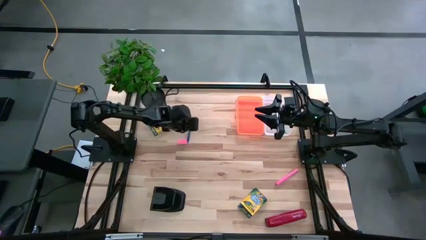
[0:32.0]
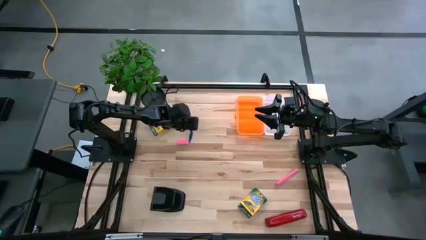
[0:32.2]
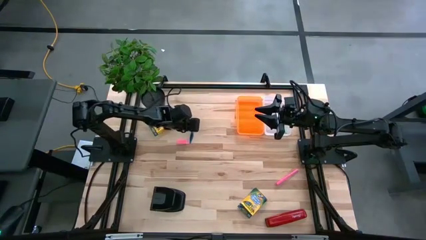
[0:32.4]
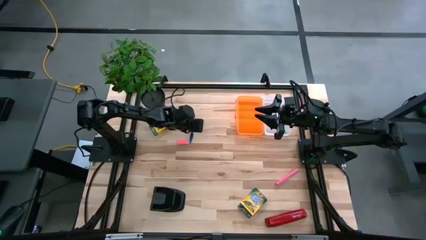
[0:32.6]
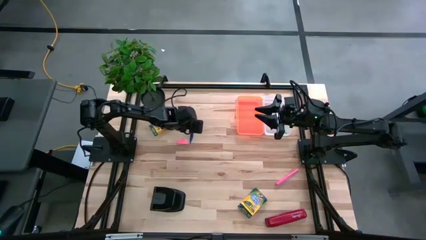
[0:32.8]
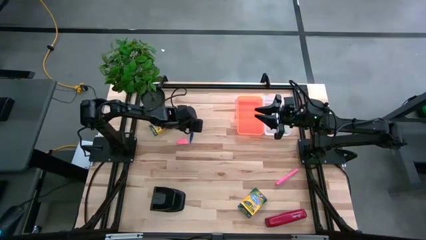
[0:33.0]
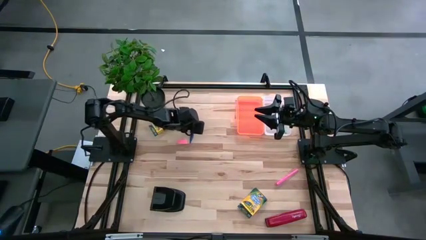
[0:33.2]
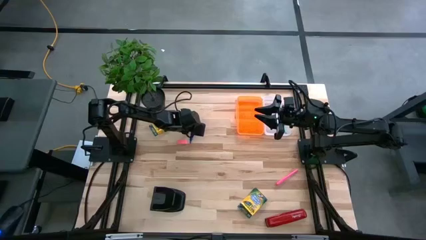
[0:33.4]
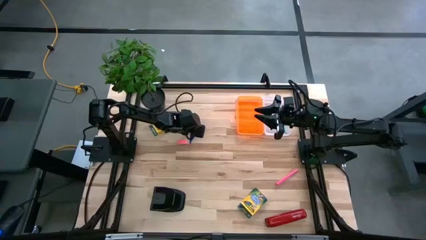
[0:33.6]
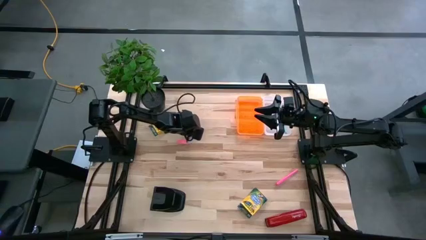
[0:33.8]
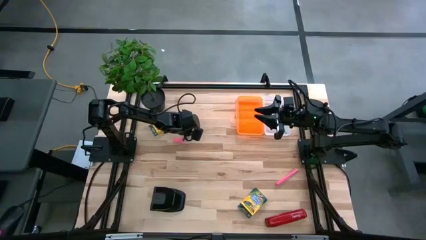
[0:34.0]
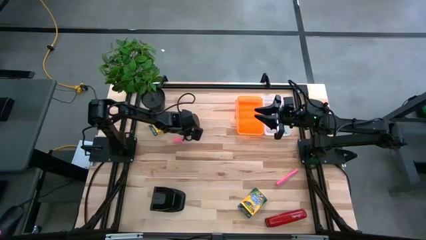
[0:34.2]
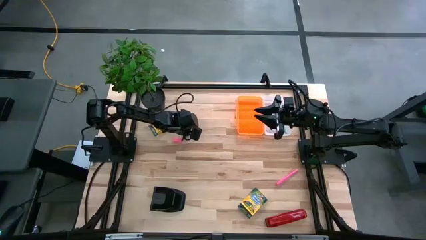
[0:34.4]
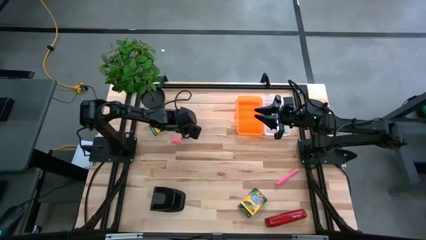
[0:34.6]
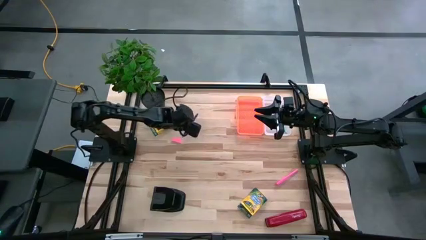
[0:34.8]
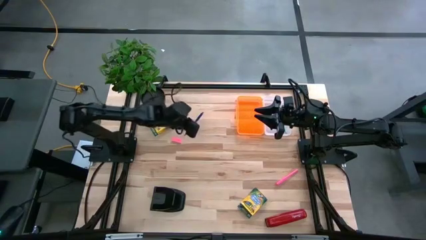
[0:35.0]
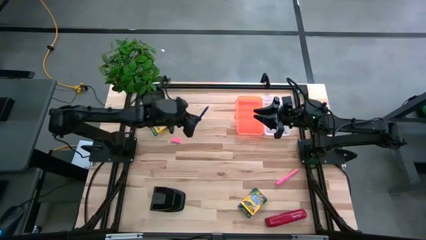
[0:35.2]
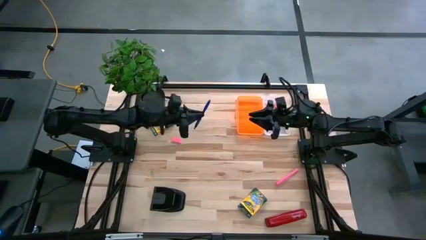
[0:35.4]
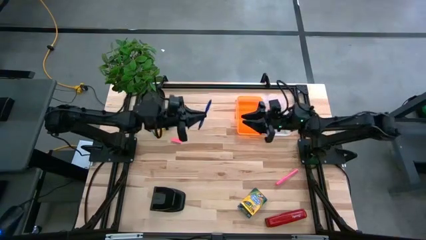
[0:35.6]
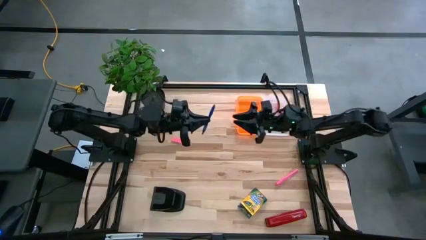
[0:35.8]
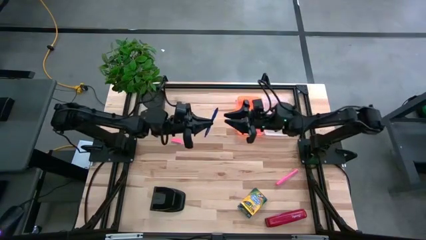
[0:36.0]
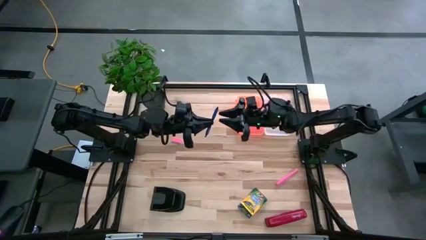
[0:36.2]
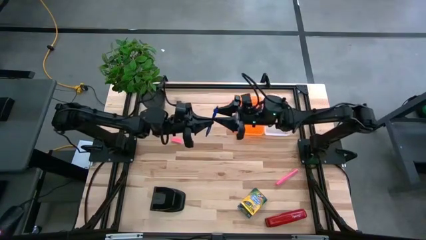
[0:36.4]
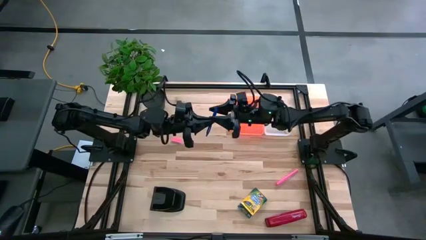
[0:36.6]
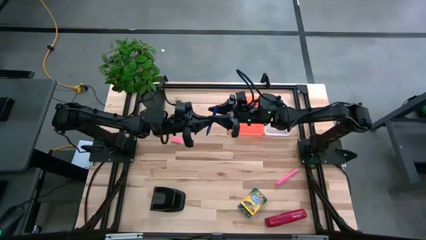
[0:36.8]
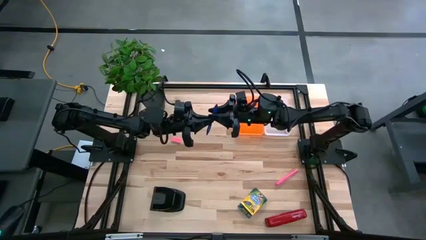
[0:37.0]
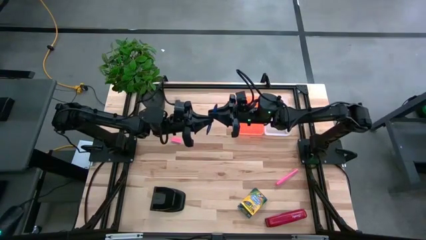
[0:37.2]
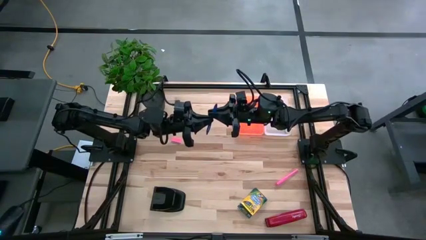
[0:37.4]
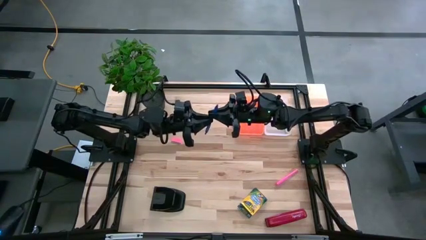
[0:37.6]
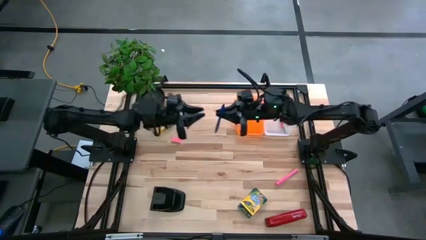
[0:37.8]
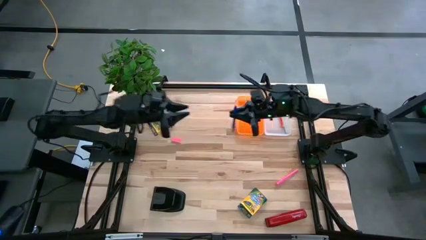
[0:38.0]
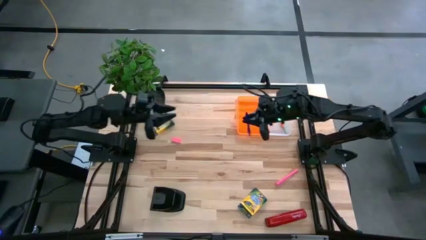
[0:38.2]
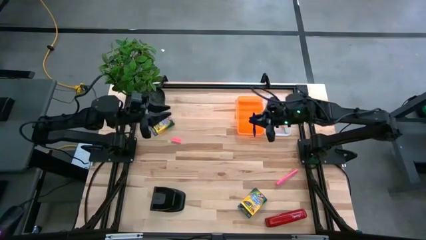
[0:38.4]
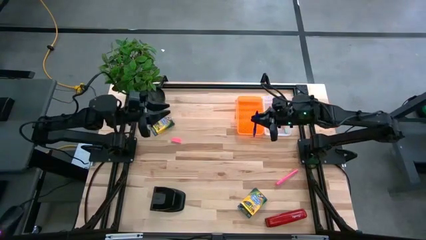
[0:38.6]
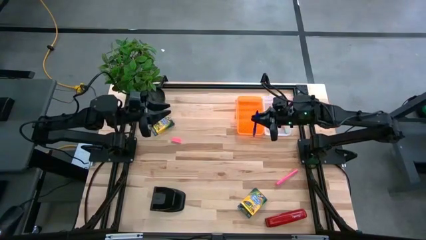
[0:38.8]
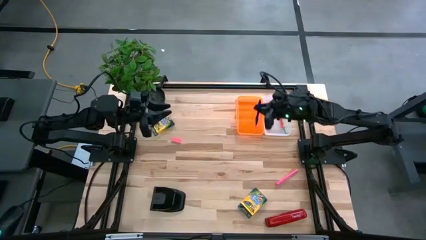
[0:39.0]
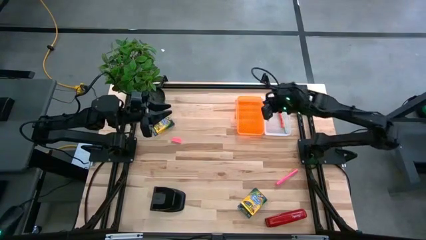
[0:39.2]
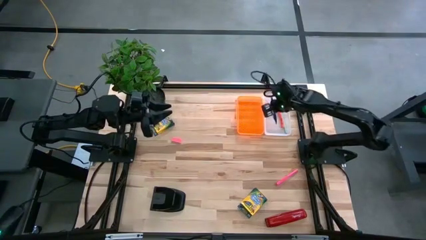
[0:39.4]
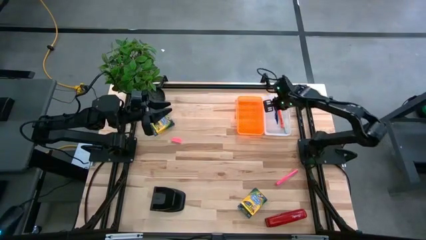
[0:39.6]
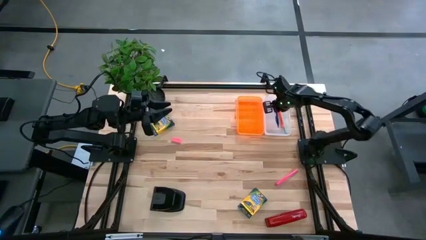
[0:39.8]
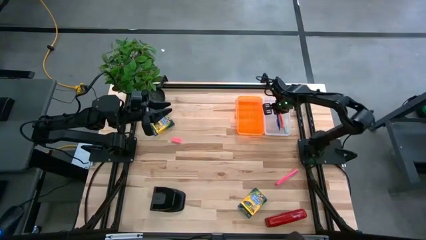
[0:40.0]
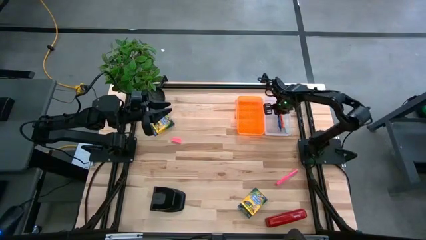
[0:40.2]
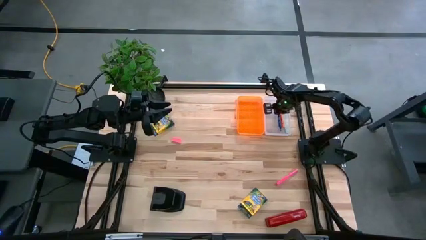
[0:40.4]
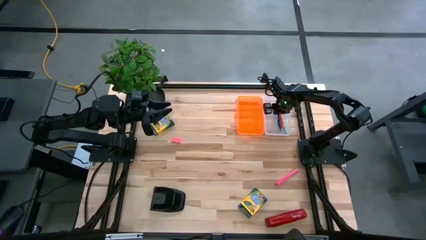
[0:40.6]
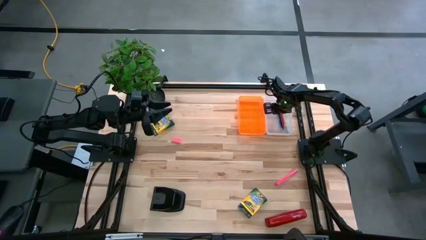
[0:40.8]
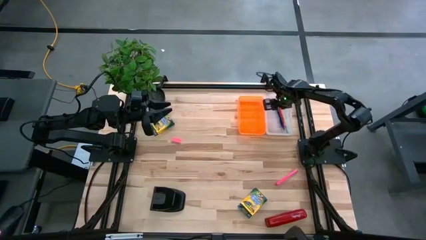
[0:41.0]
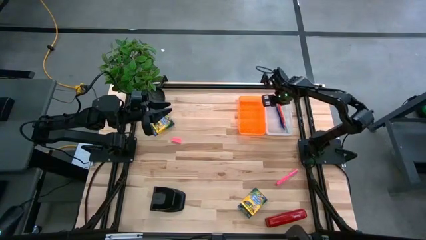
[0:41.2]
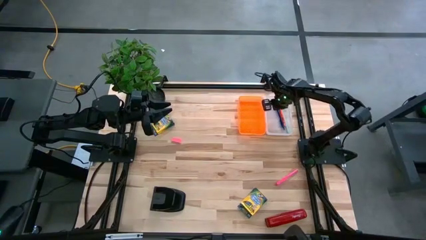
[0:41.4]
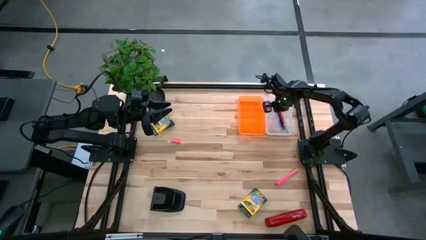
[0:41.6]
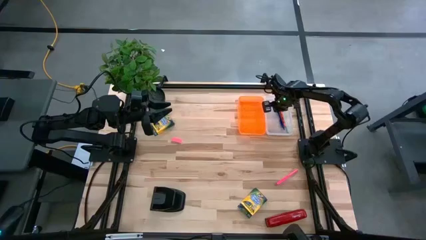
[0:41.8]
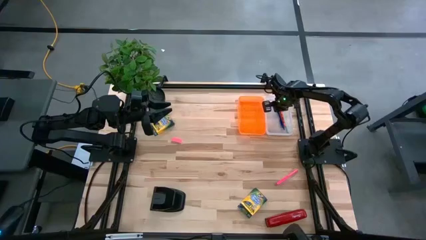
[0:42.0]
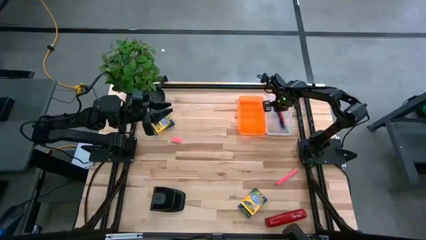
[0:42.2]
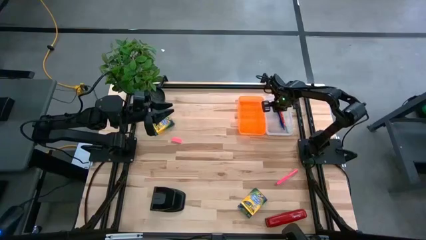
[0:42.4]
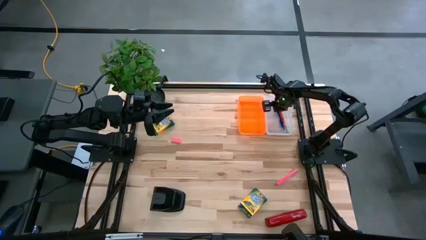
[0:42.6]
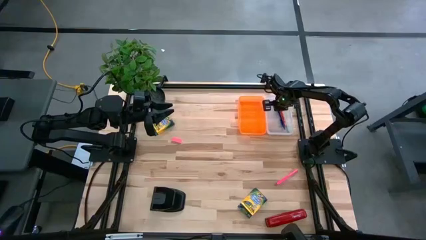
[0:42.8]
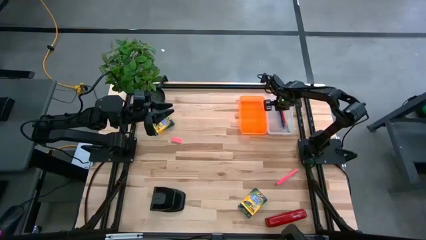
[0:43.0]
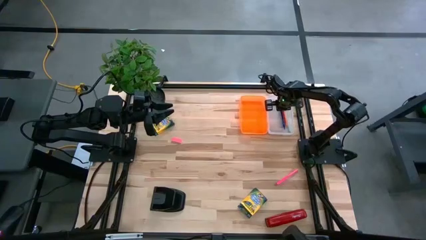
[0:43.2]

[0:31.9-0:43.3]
Task: Pack school essentials
Put the blue pen into the orange supply box
